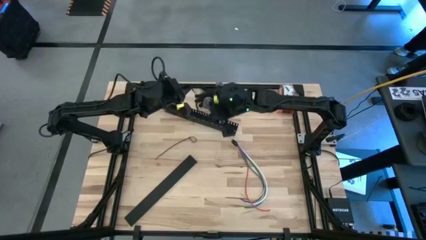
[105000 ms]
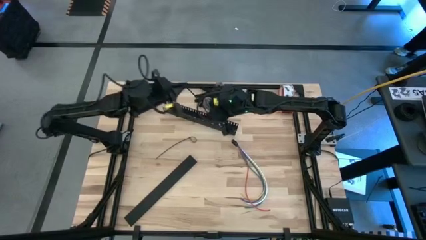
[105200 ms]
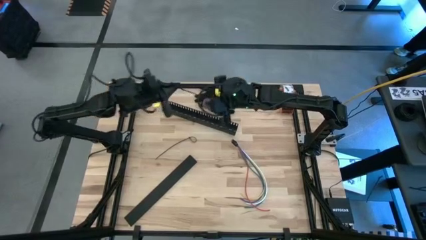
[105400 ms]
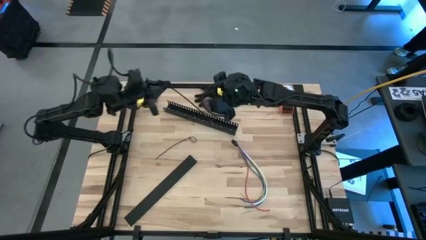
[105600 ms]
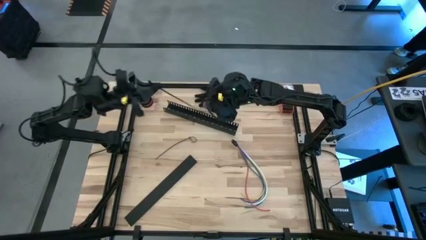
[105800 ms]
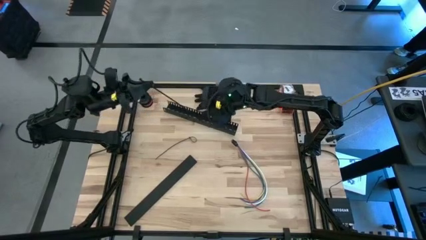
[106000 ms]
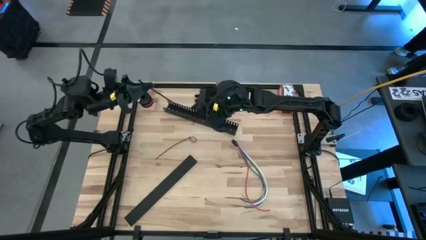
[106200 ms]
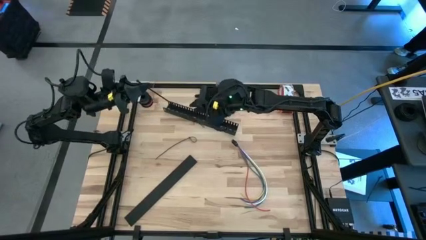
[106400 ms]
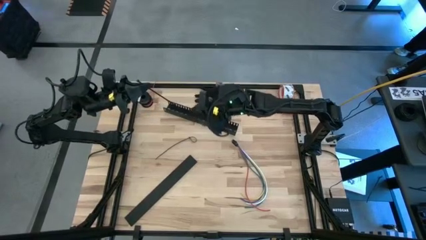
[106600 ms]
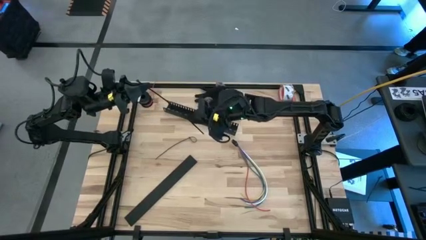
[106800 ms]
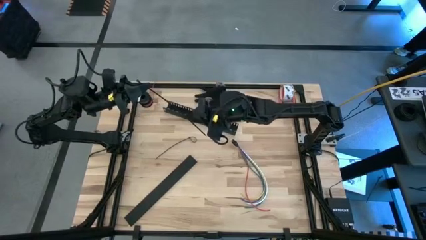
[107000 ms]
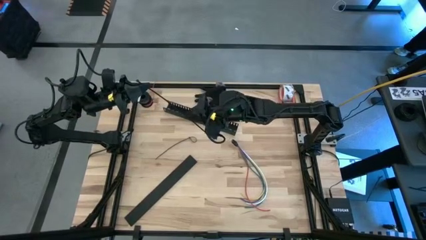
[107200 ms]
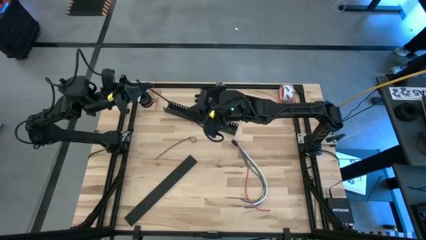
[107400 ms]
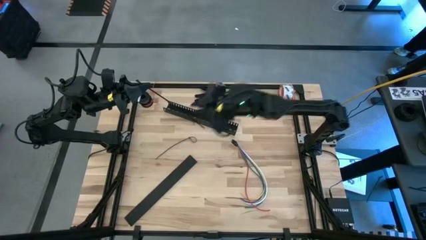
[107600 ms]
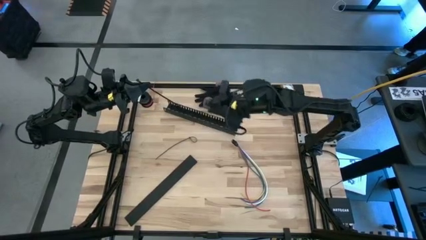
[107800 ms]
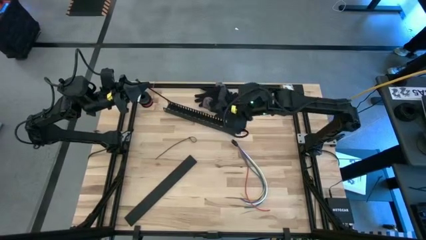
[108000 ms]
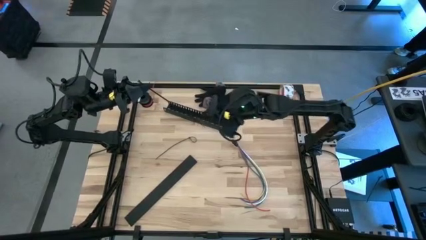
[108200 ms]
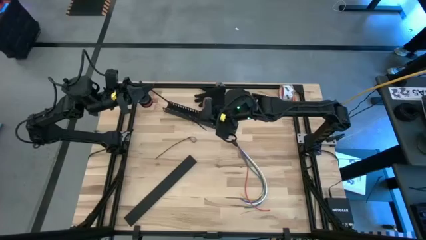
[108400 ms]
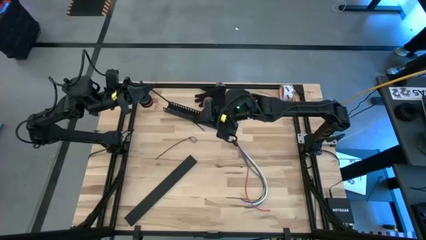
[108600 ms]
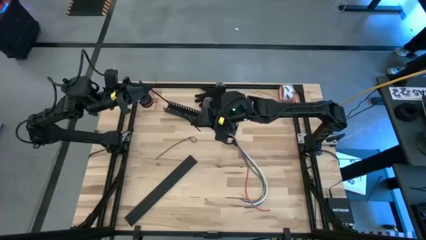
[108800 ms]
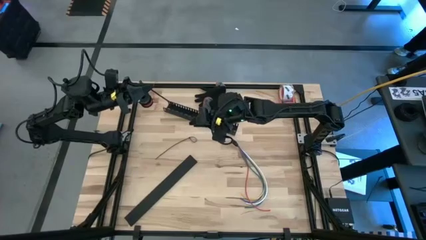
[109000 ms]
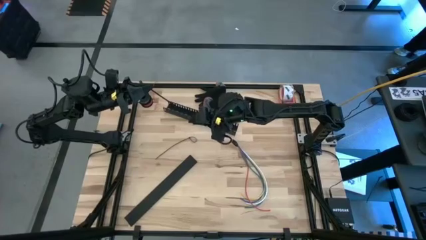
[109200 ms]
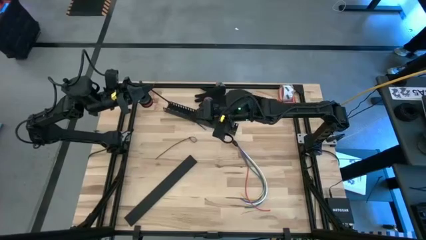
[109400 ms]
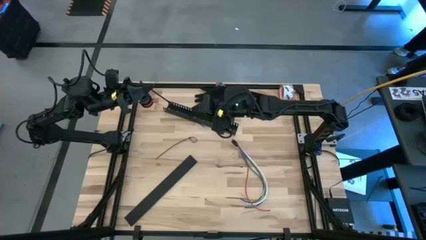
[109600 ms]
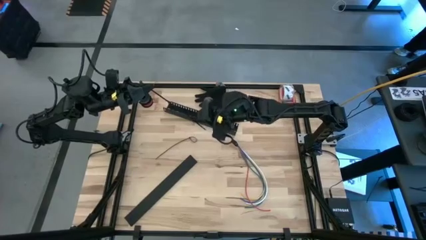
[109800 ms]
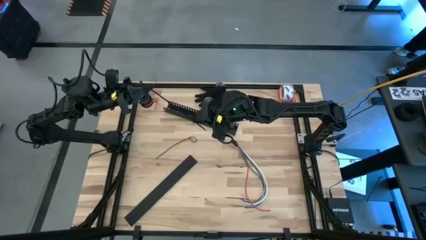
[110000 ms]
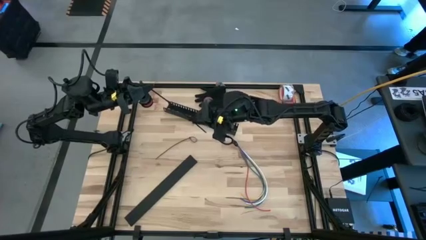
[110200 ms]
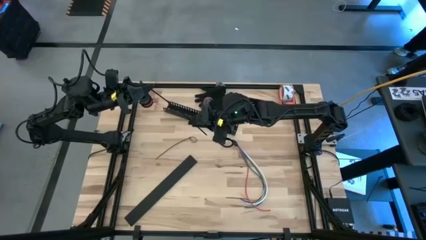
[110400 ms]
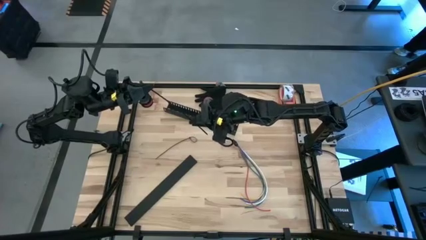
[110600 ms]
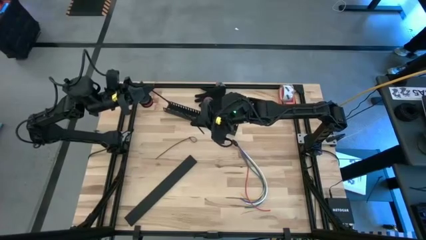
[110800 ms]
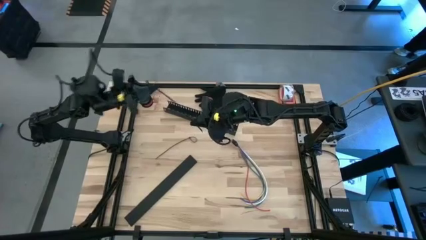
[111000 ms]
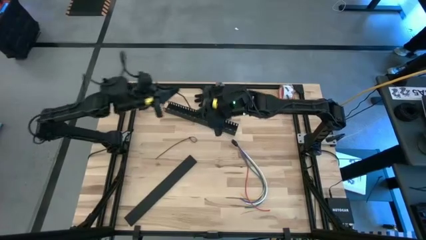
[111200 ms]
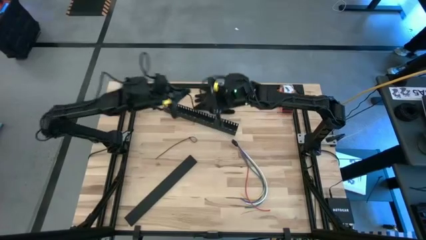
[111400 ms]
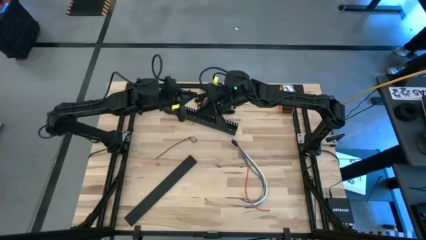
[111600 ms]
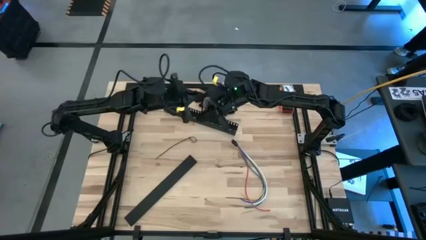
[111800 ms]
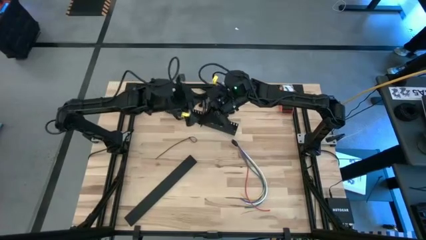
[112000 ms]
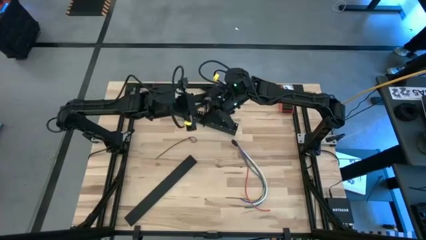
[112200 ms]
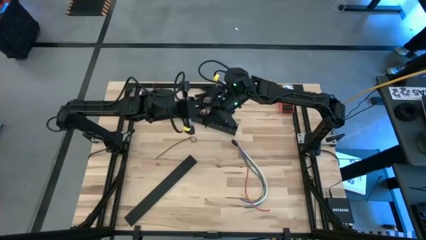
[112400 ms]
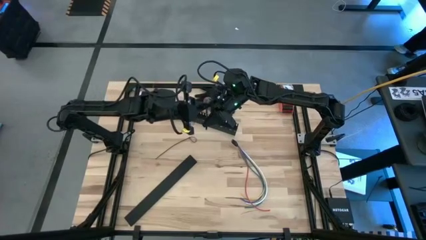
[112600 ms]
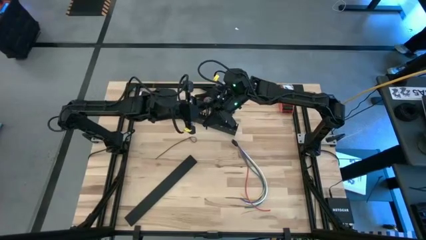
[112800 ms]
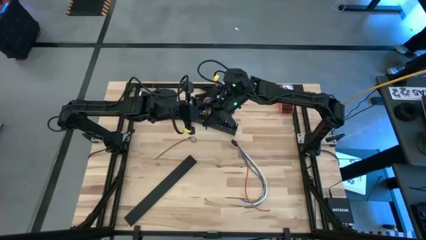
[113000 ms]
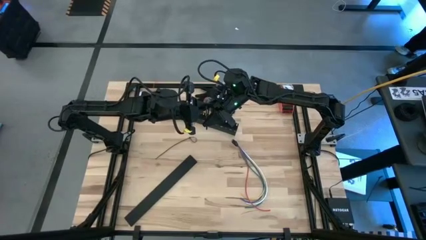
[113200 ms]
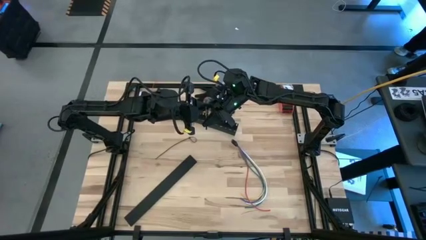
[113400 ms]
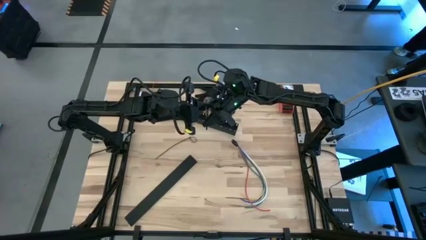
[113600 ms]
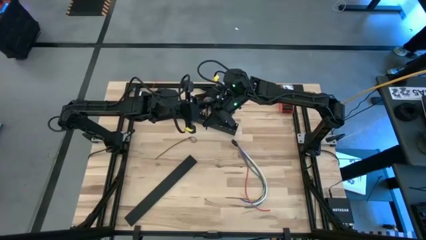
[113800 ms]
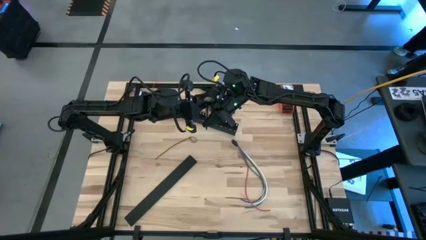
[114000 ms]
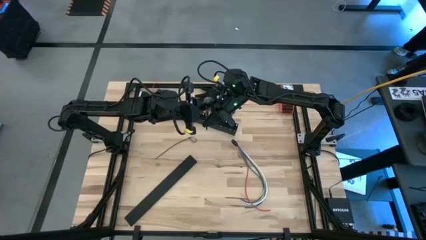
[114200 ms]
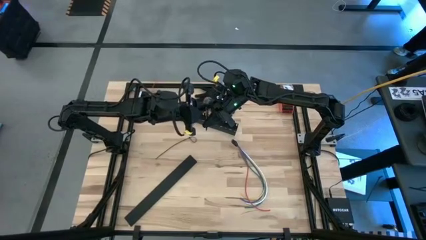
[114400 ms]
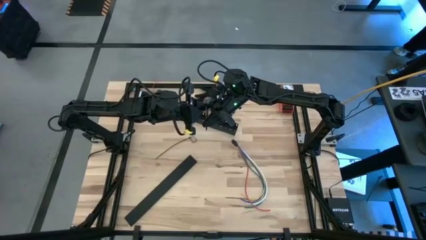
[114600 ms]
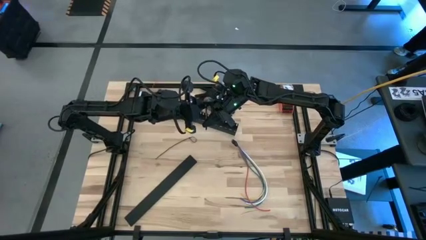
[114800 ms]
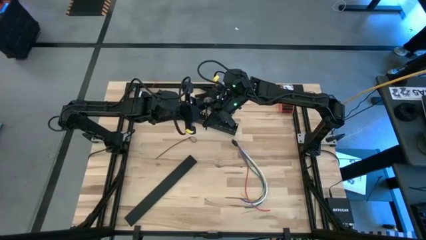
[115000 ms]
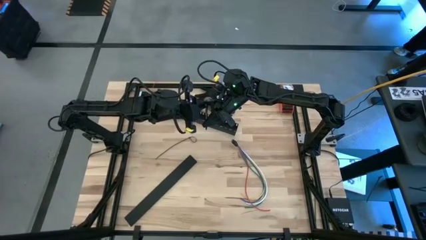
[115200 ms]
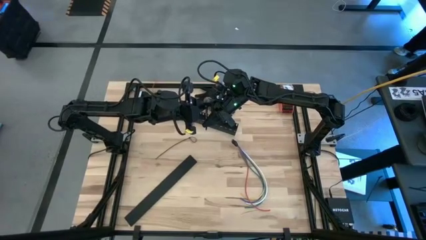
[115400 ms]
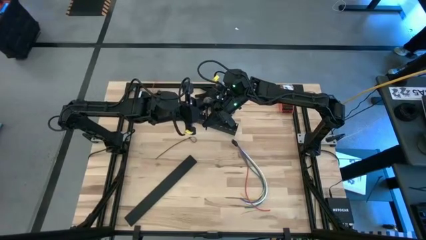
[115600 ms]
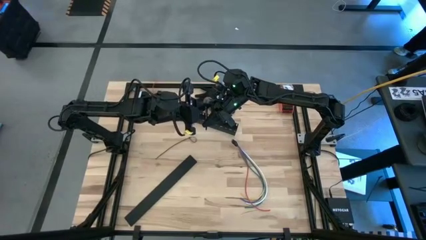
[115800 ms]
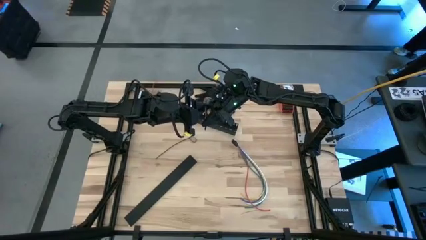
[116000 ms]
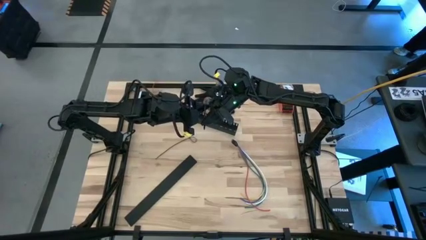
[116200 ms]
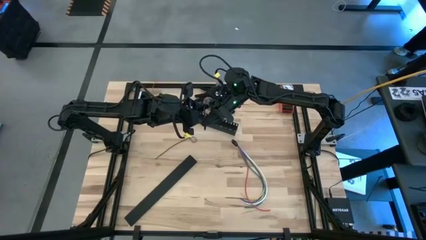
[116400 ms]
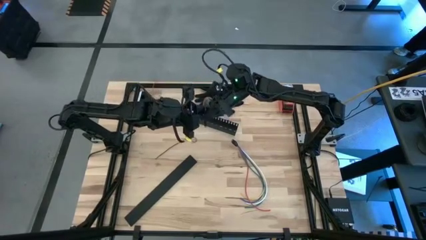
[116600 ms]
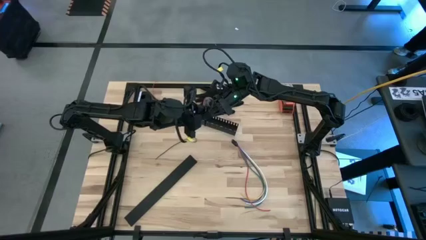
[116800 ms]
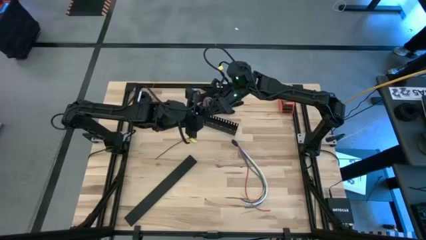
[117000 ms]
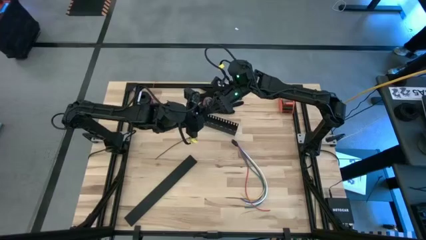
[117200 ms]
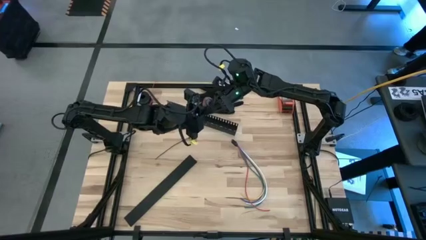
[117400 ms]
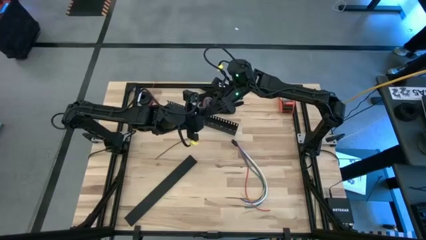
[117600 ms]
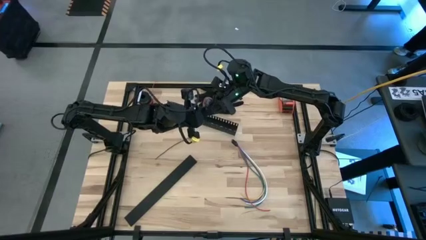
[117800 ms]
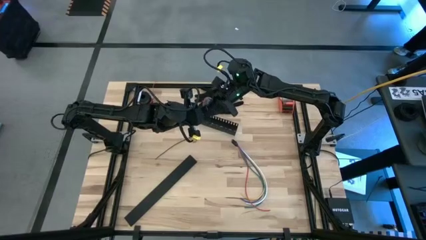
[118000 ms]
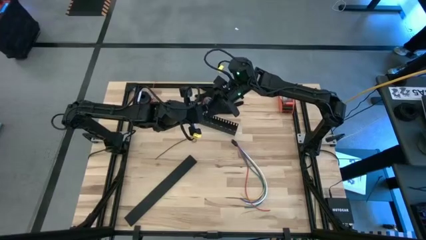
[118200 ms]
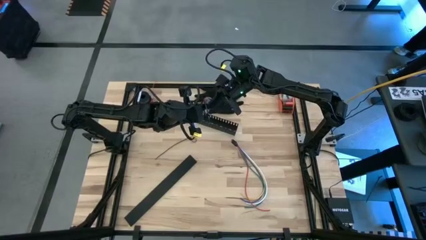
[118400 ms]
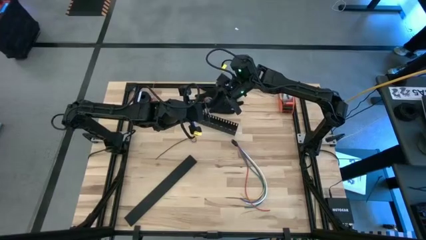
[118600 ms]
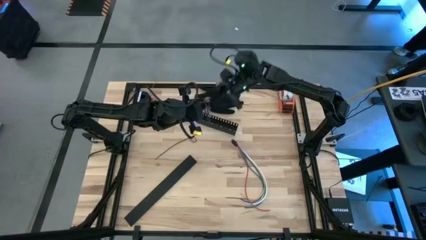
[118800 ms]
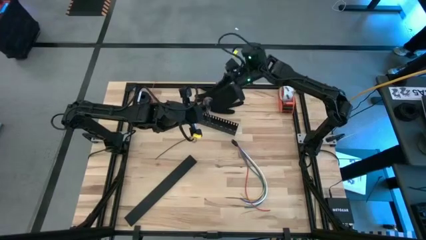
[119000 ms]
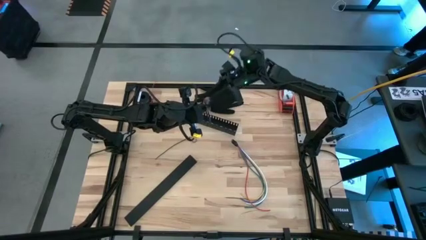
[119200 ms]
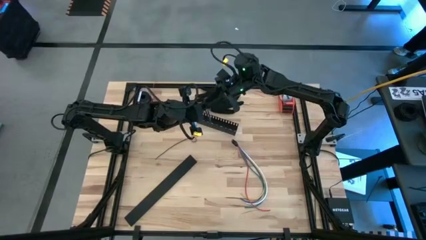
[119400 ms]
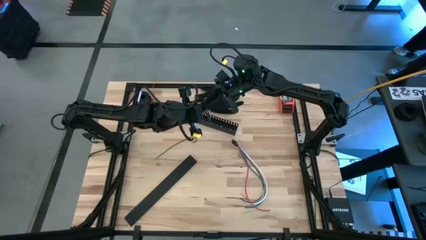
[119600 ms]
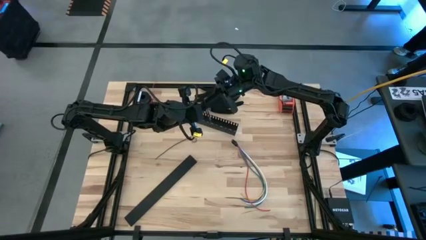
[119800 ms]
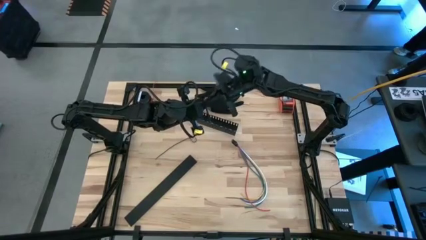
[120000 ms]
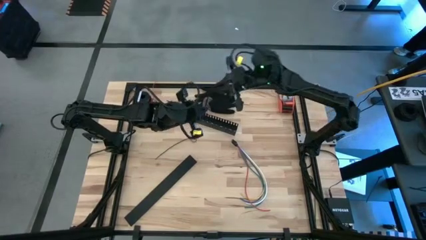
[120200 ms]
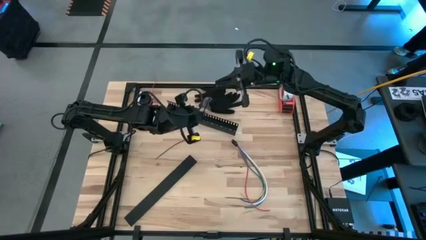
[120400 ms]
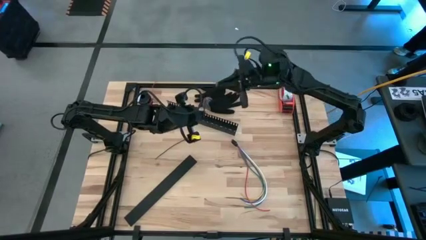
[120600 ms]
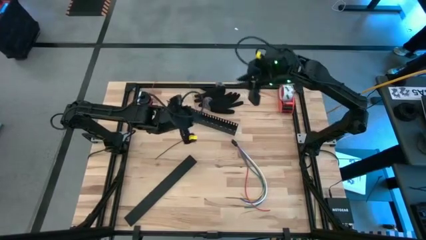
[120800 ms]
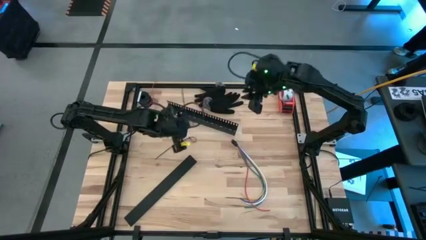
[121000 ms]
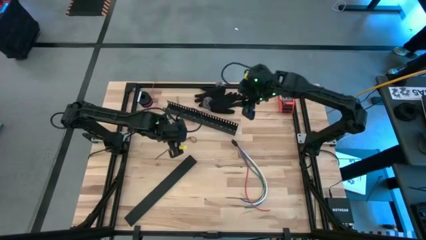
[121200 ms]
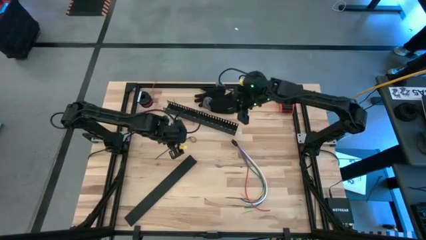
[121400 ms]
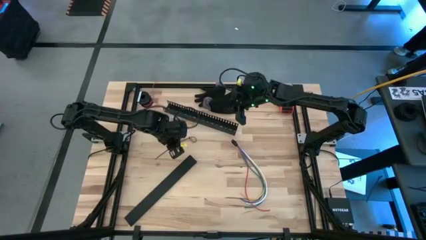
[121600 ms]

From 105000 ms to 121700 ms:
Task: Ziptie cables
Prepare the black zip tie
